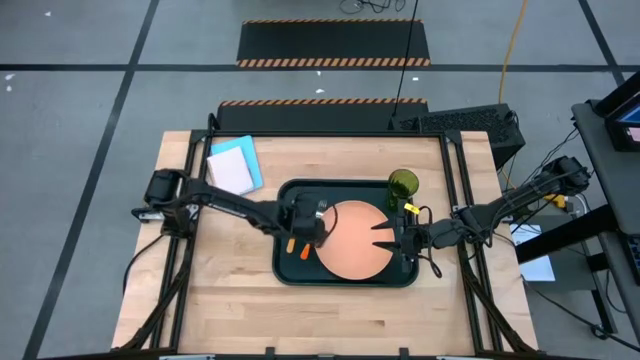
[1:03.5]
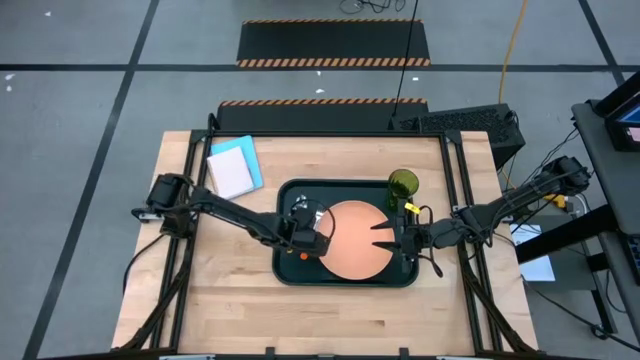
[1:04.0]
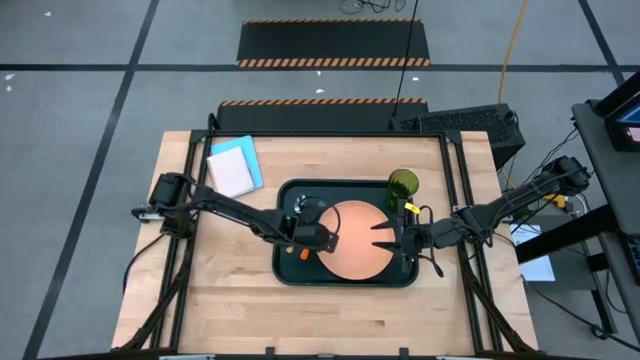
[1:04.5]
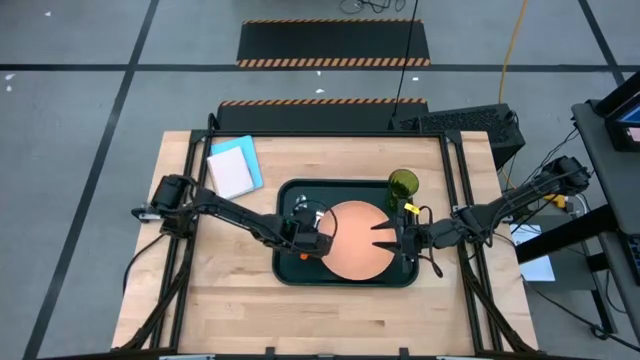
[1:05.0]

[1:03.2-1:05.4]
Task: Pick and place plate/cup/fork/spoon on tray
Adjust the orange plate

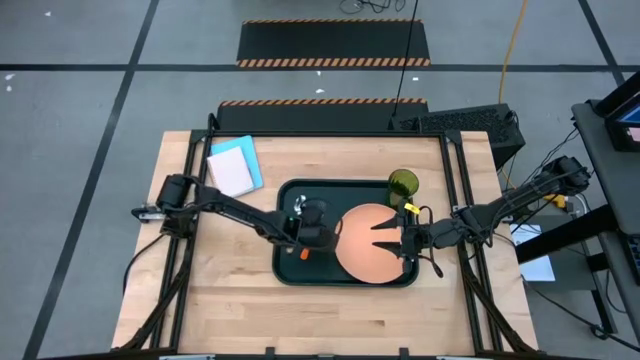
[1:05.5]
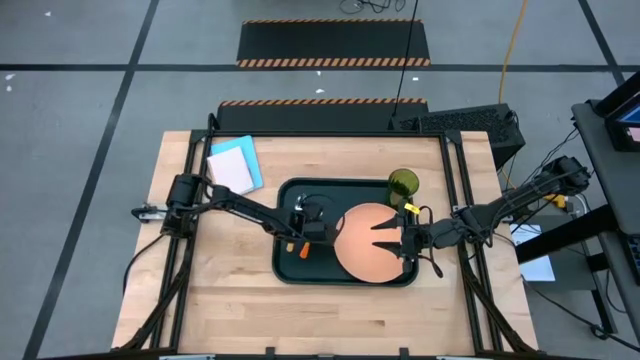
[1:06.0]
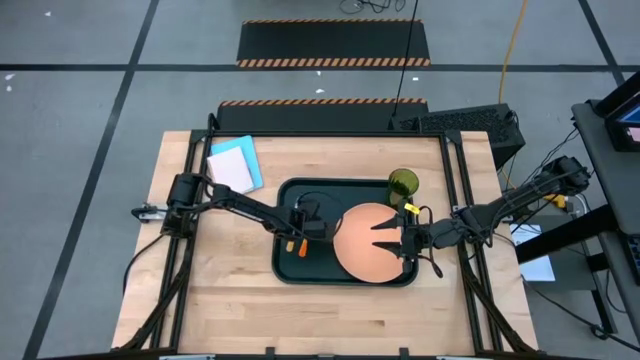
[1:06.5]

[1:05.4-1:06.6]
Adjust the orange fork

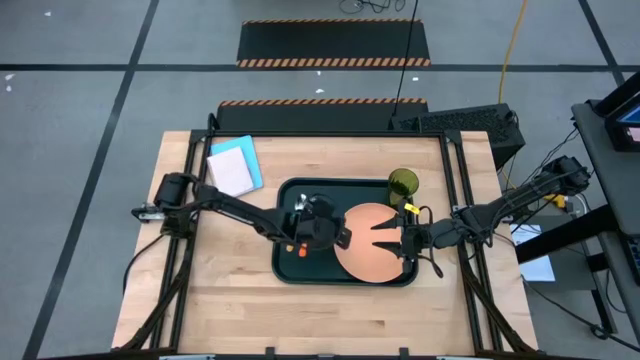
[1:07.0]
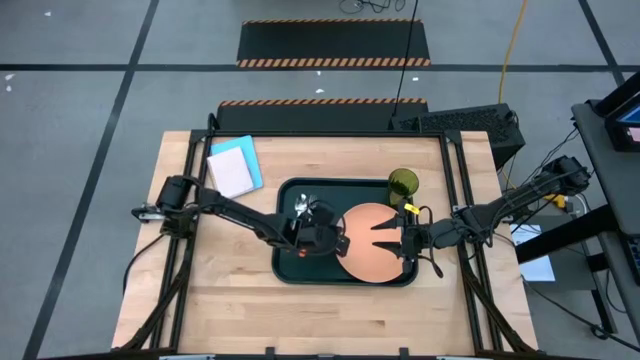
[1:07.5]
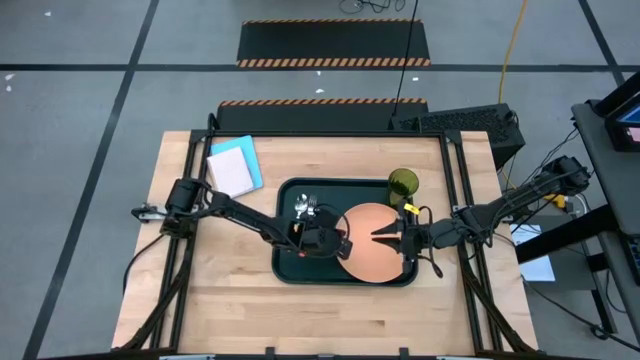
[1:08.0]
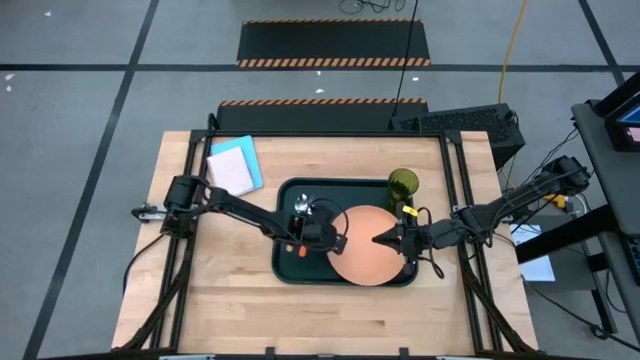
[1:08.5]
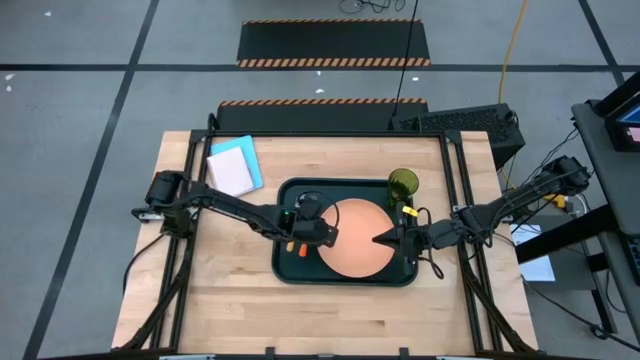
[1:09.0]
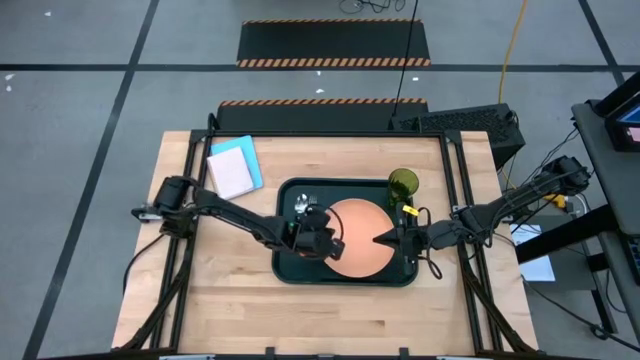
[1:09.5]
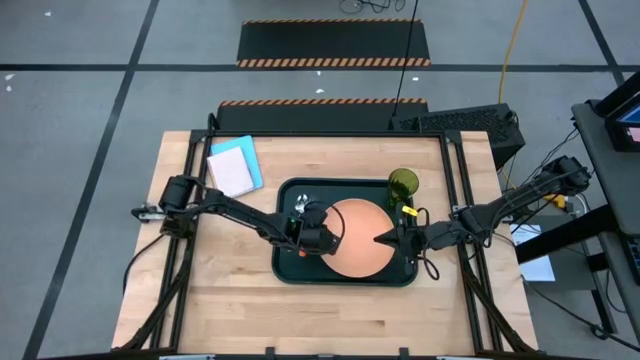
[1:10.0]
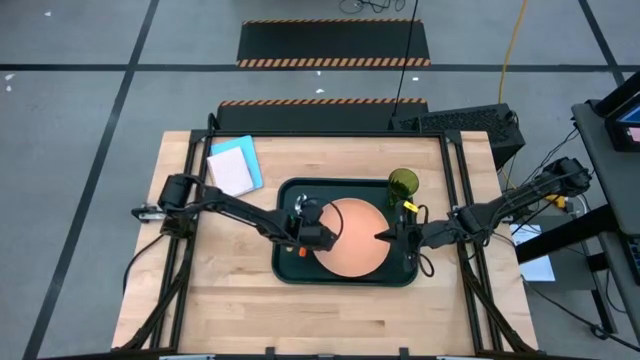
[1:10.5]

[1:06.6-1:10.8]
Adjust the orange plate

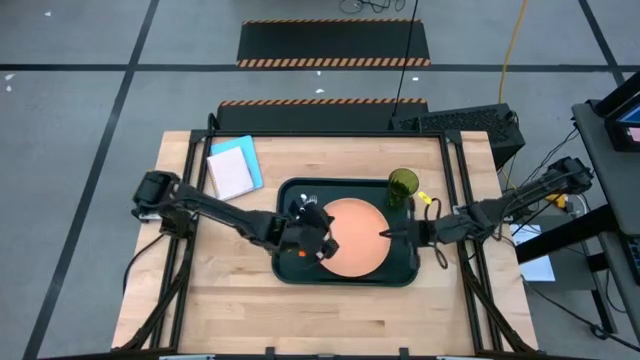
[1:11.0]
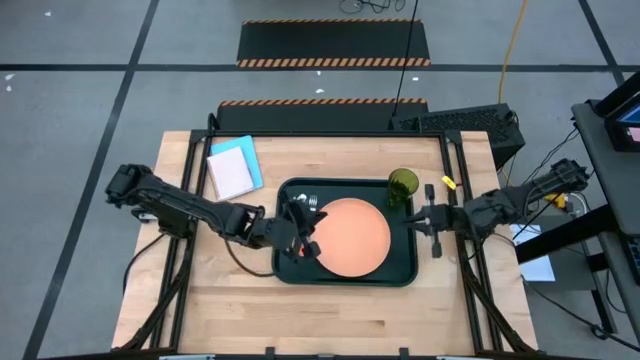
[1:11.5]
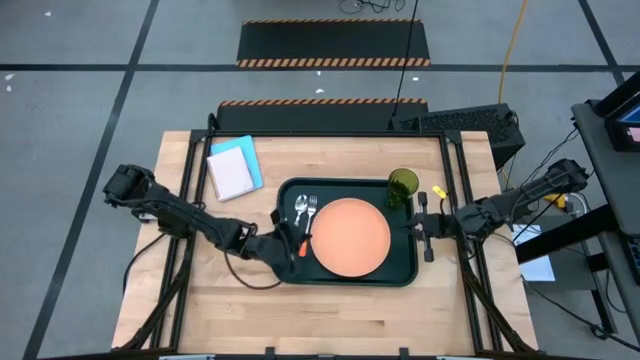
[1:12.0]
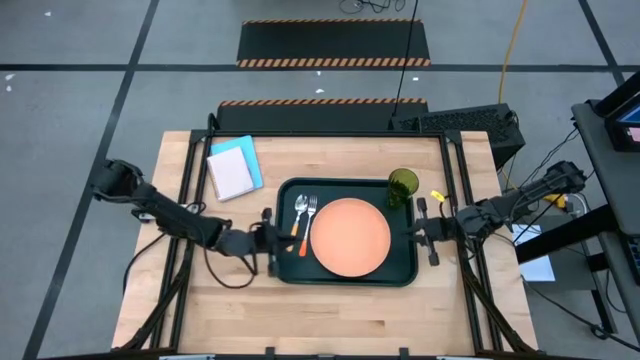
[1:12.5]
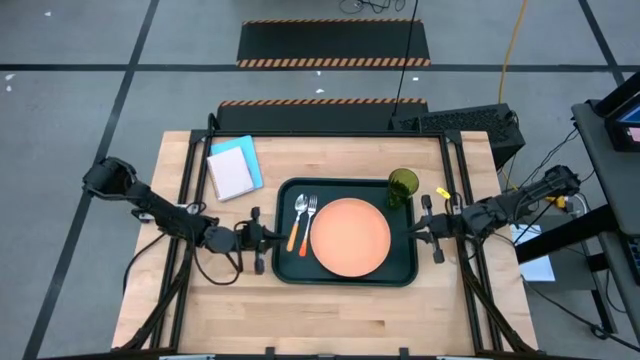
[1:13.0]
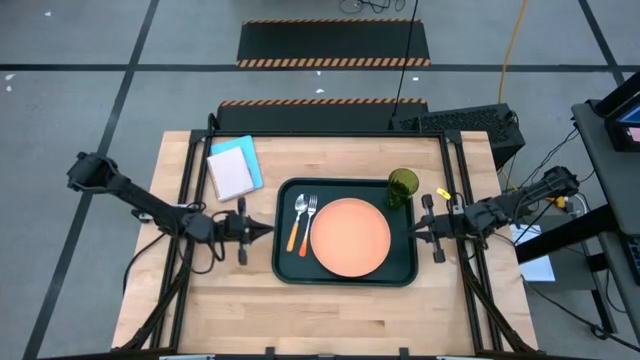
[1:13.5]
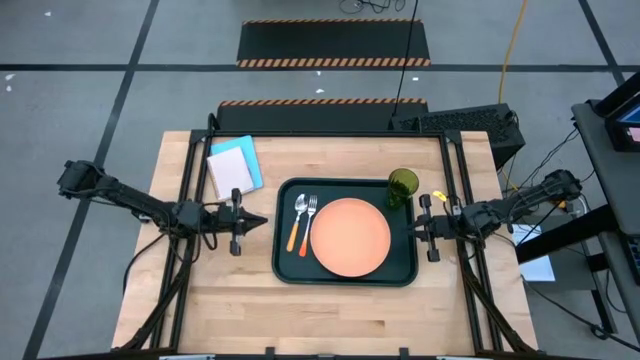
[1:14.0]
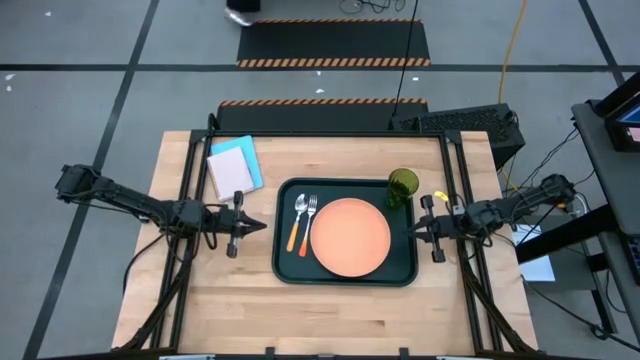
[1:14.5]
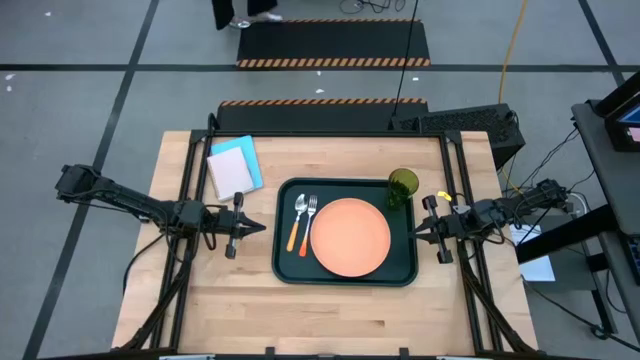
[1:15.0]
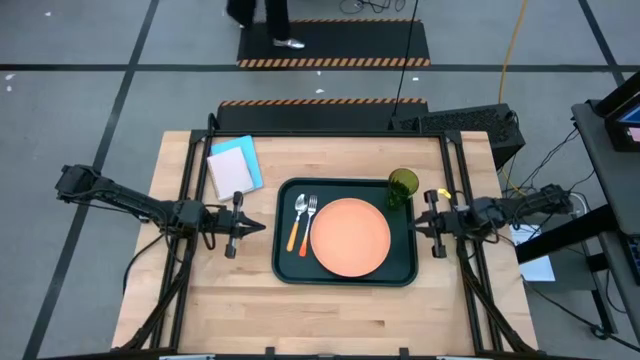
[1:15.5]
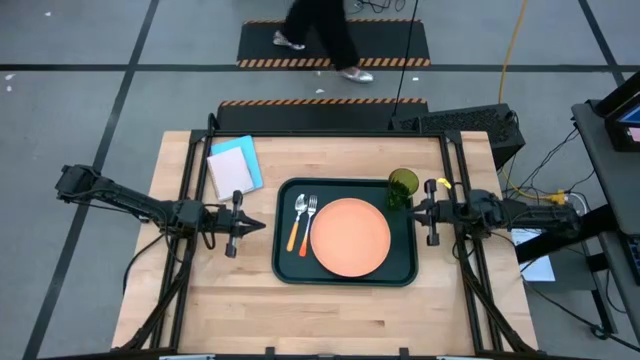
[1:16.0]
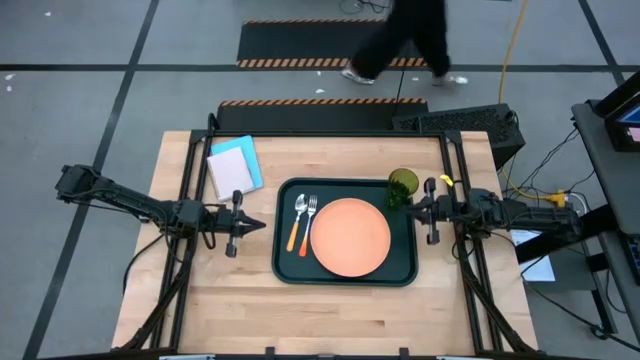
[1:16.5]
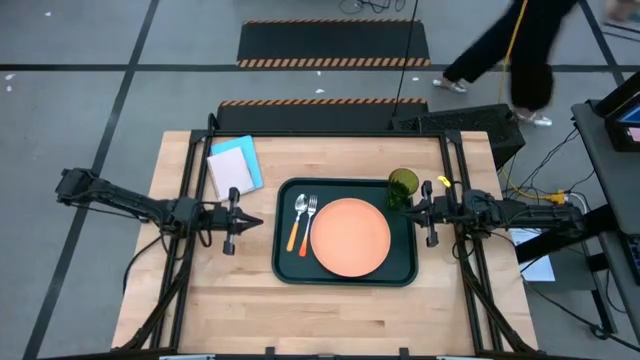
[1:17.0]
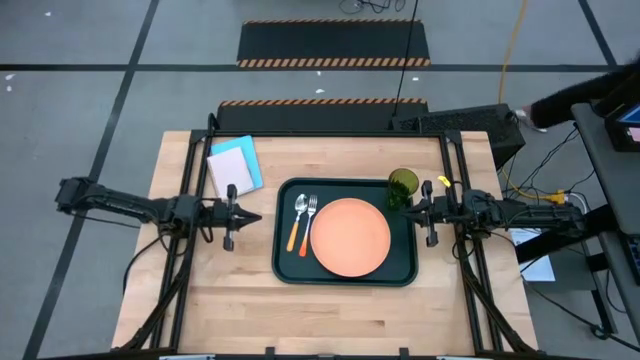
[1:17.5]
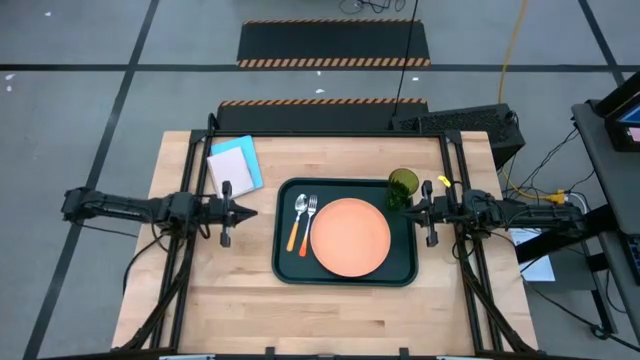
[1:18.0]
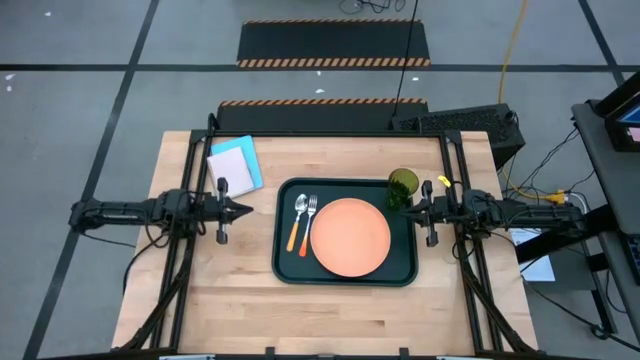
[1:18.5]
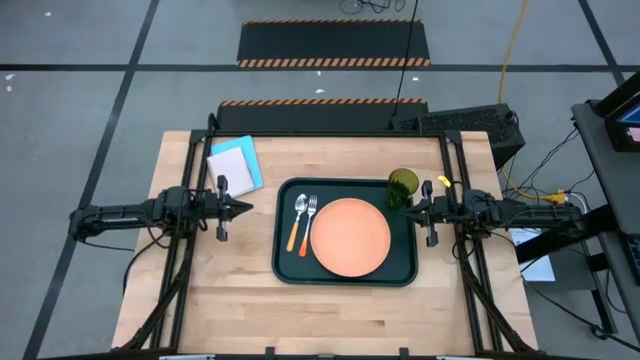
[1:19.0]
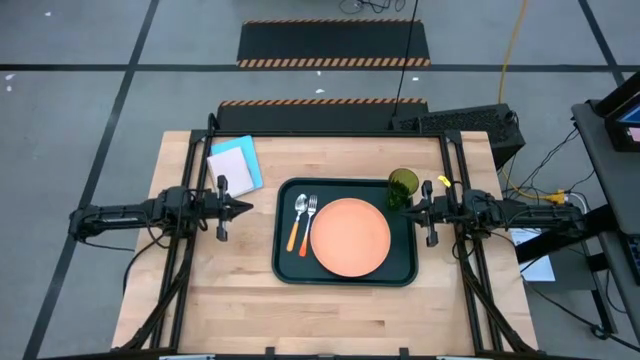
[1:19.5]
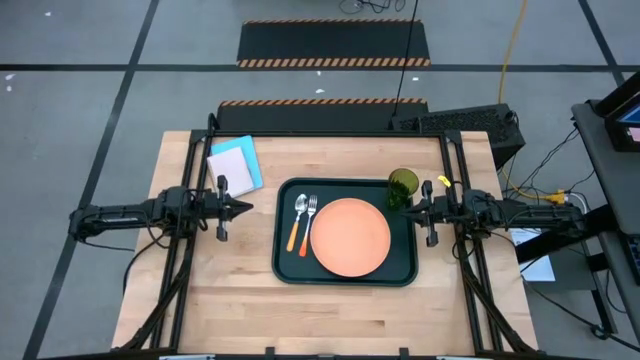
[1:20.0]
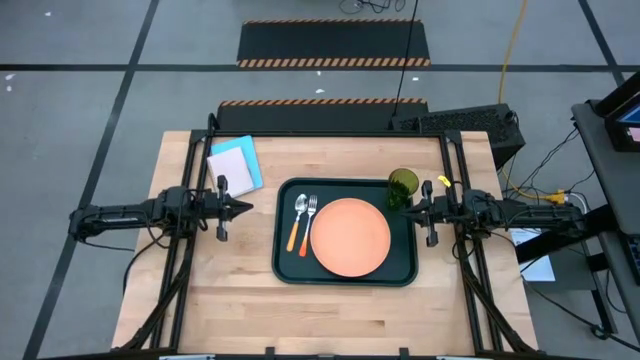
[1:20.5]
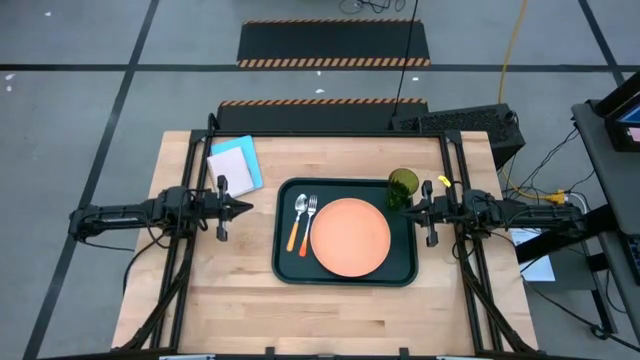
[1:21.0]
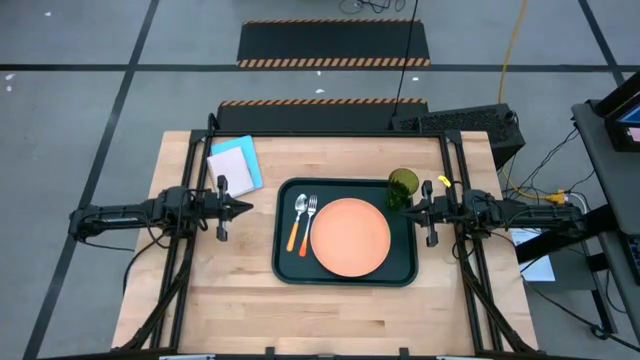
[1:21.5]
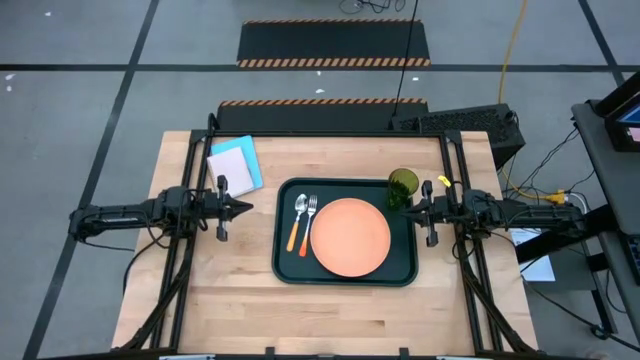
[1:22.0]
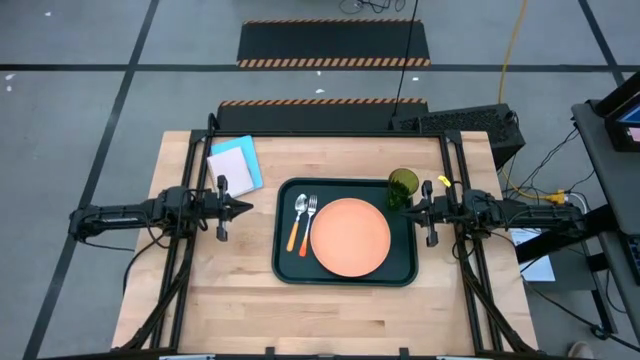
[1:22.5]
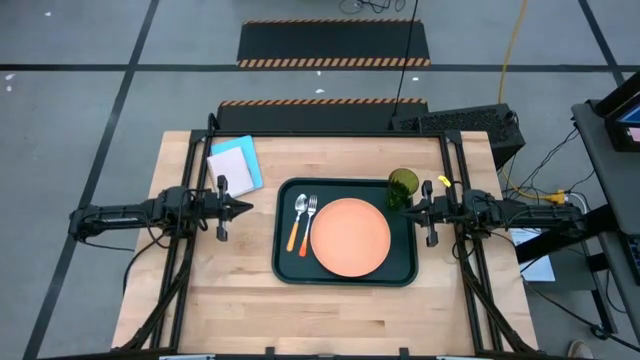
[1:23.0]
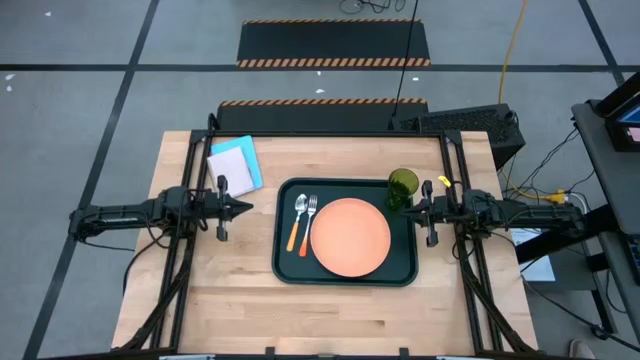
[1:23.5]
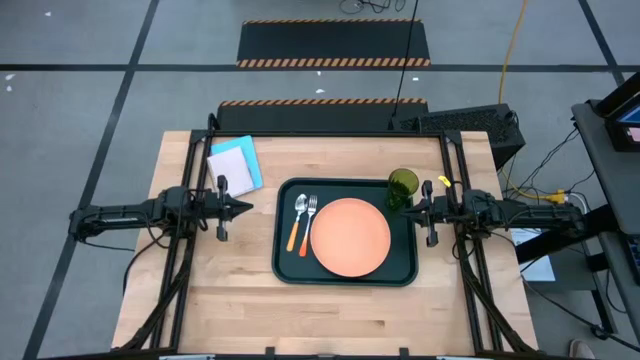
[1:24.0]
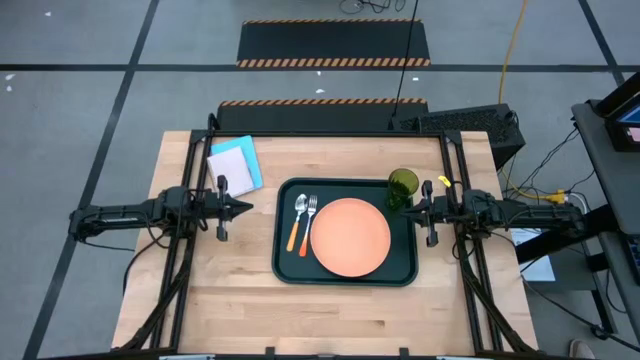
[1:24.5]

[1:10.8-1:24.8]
Return to Home Position

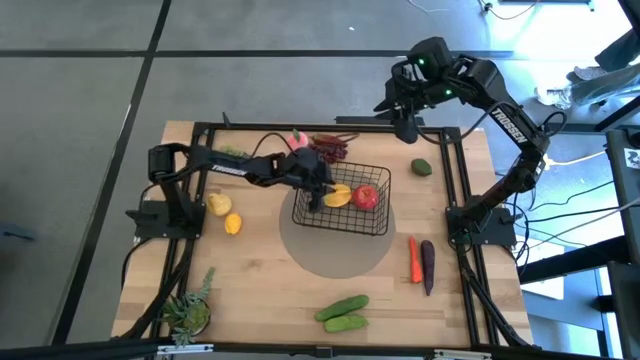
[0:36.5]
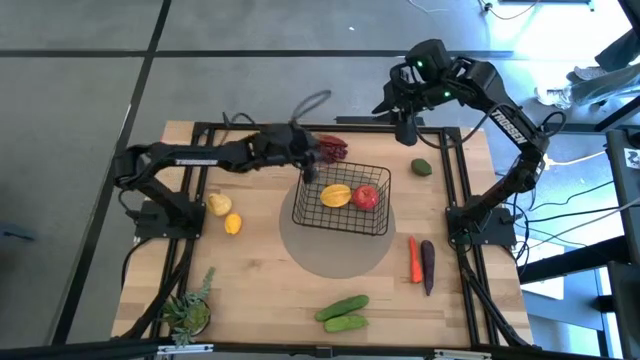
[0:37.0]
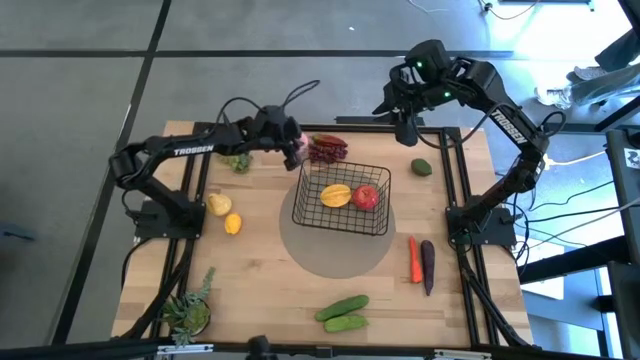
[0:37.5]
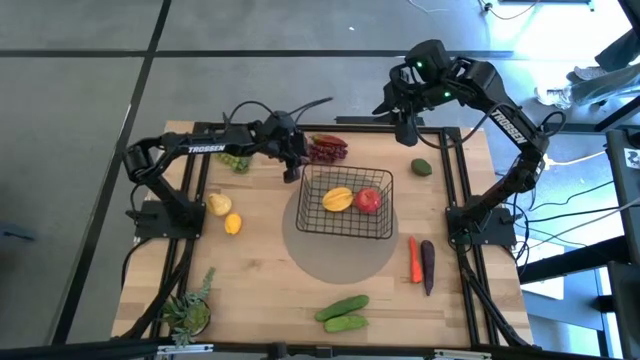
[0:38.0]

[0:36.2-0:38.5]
Task: Build produce basket
Adjust the black wire basket on the table
